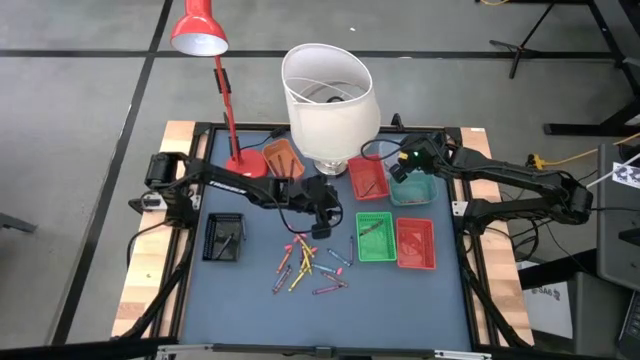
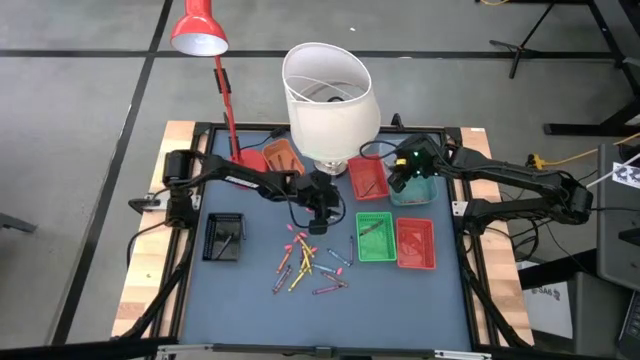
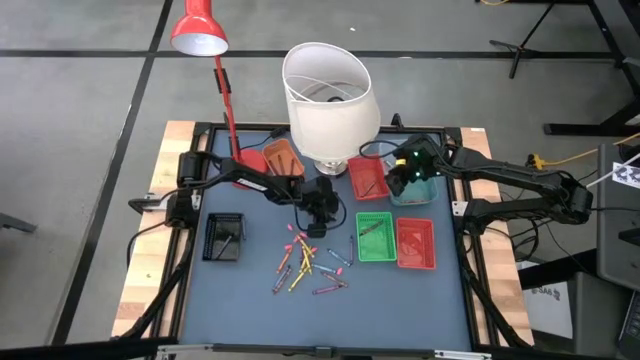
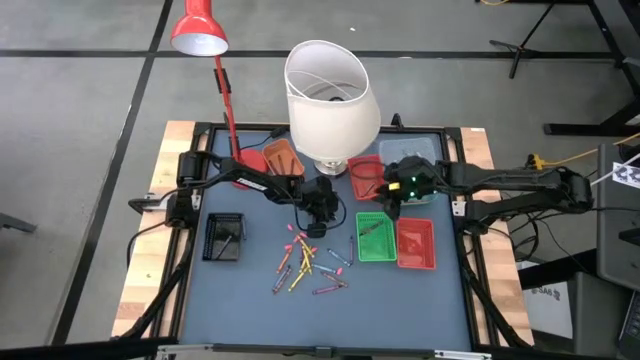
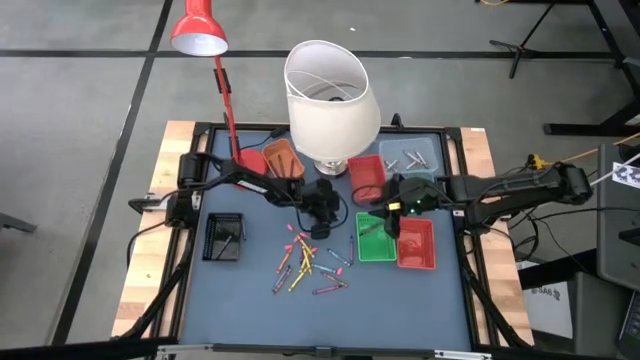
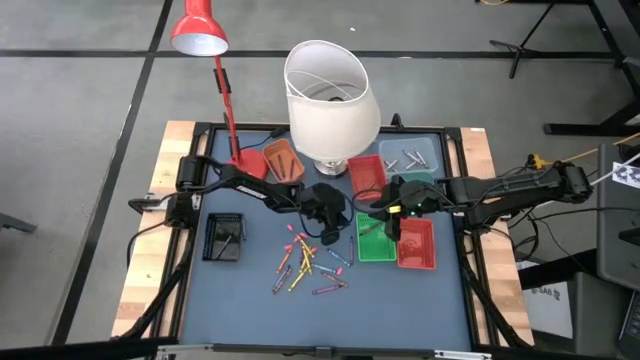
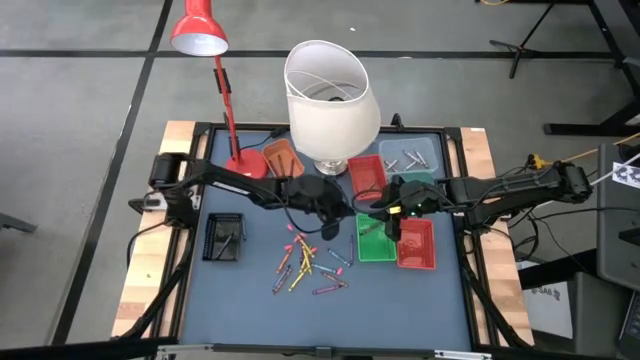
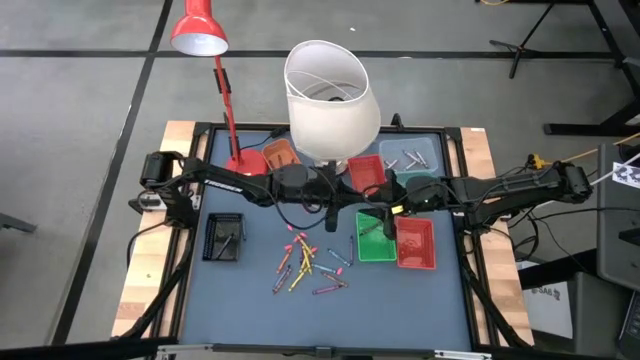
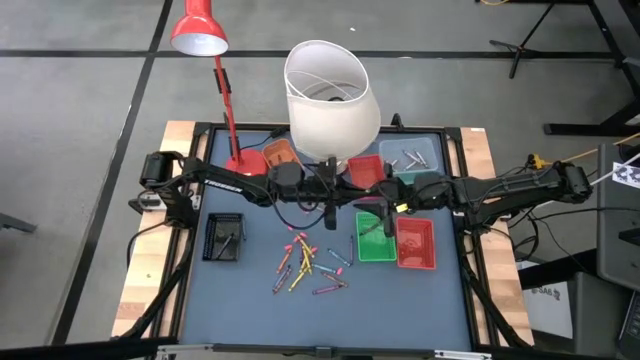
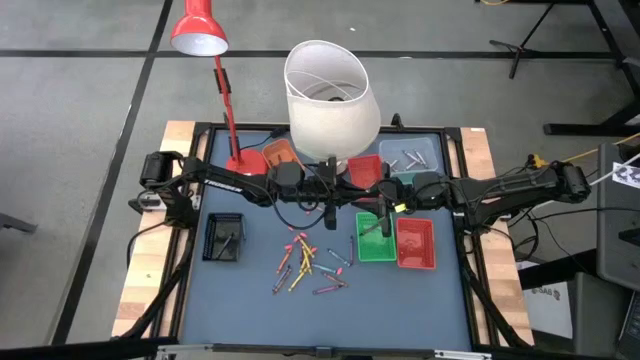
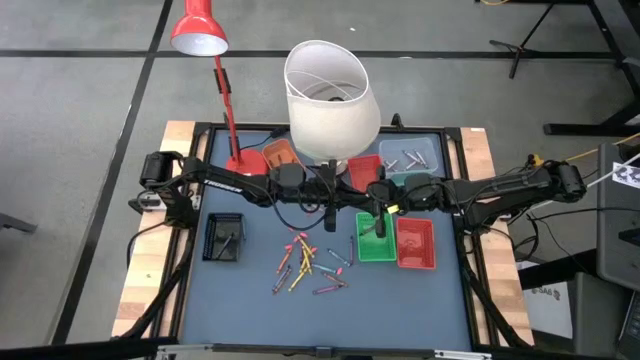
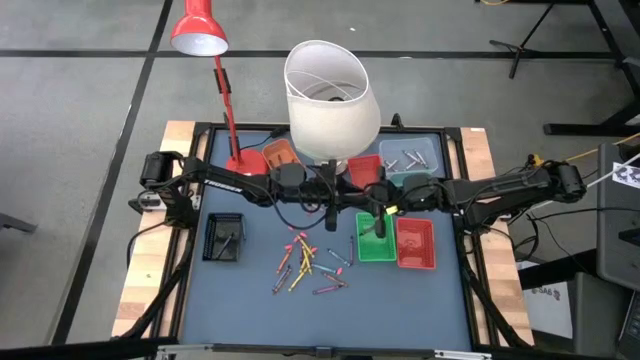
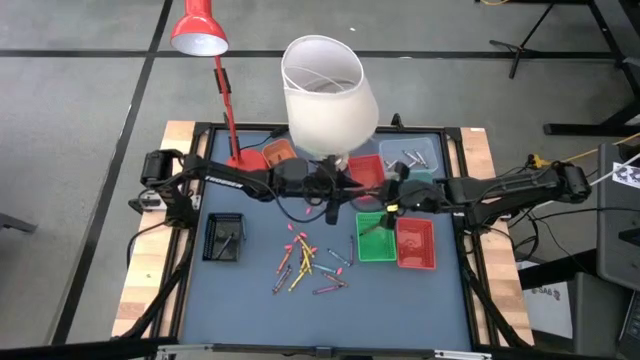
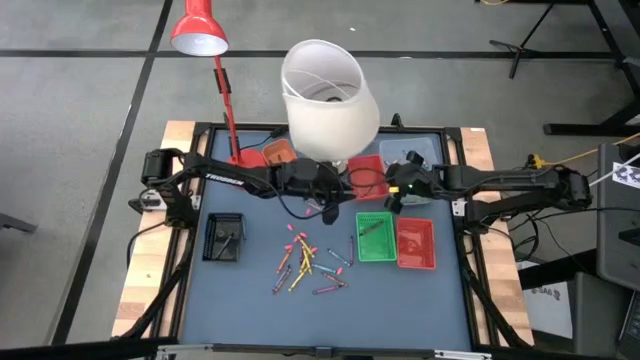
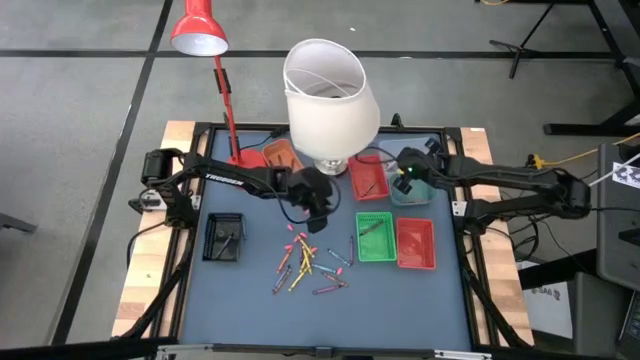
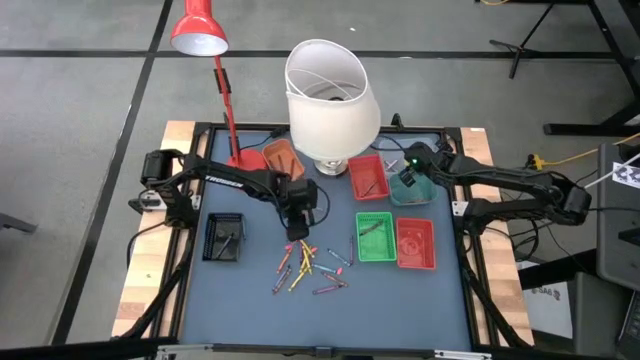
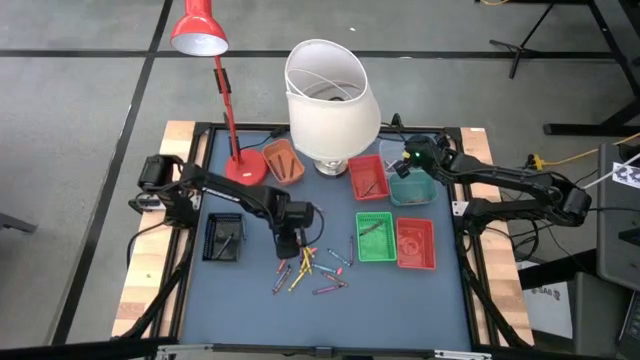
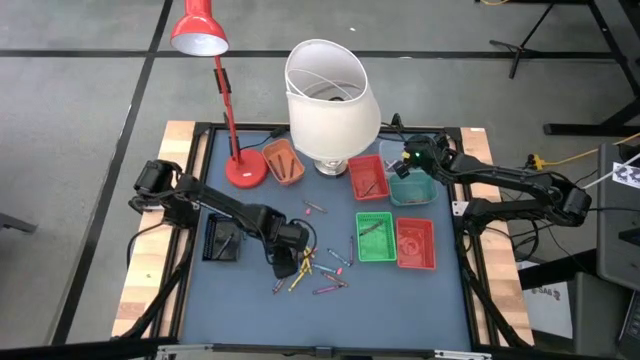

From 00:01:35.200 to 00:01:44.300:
Task: Sort crayons
Put the gray crayon into the transparent bin

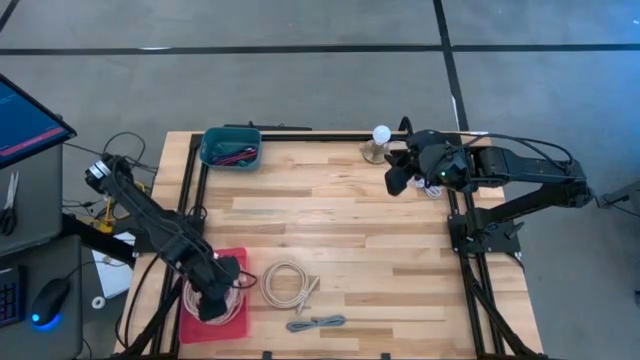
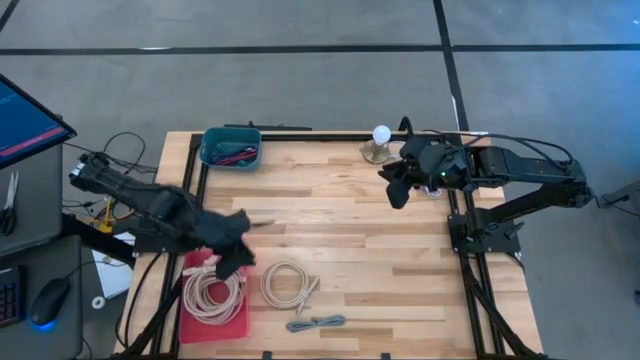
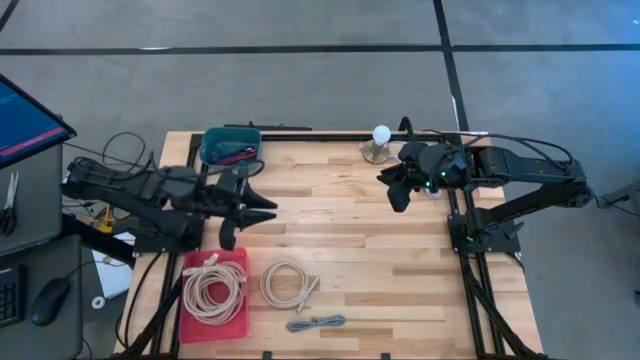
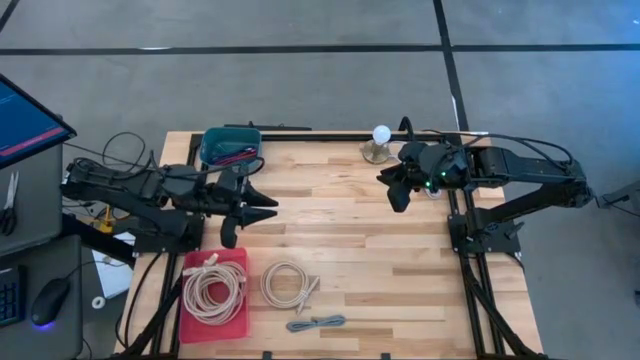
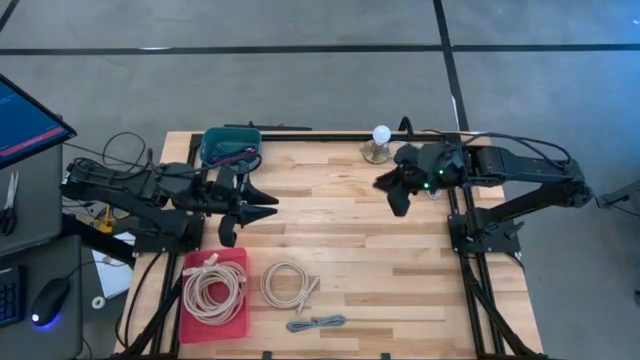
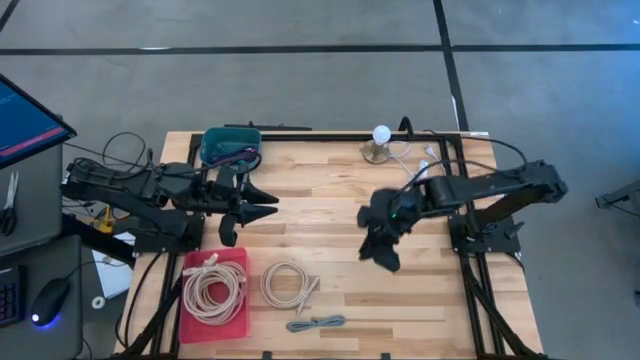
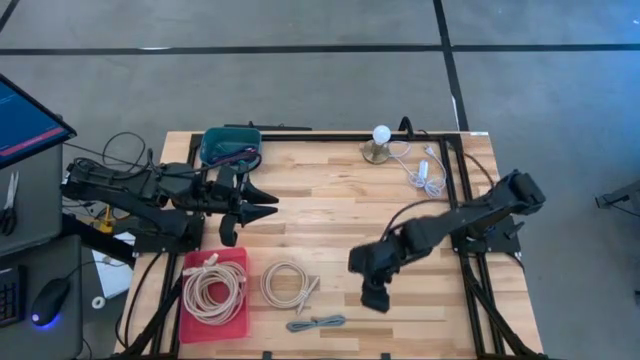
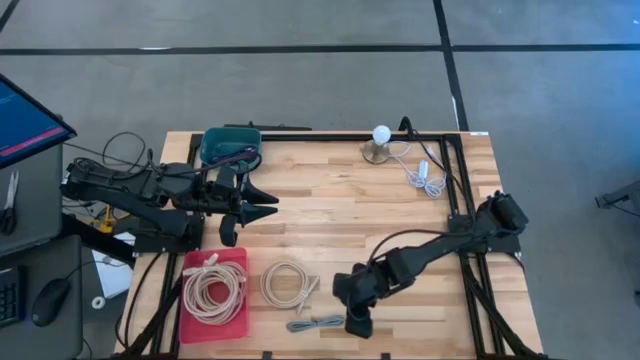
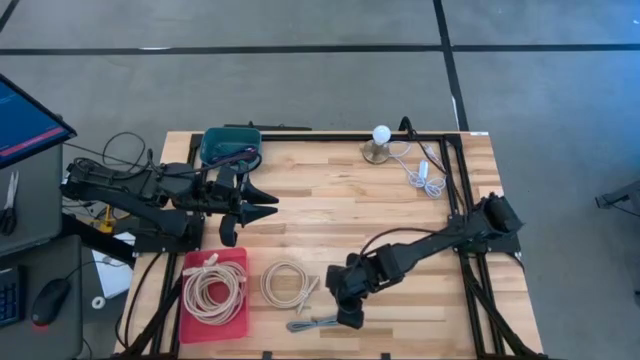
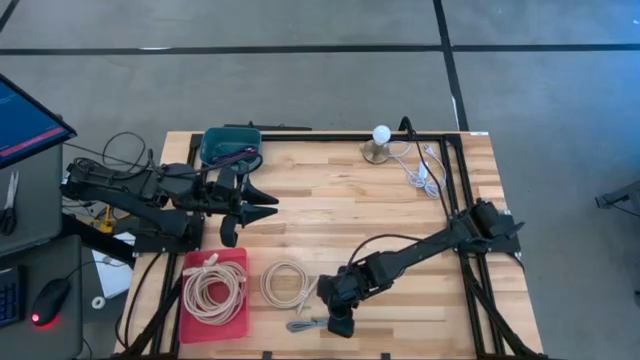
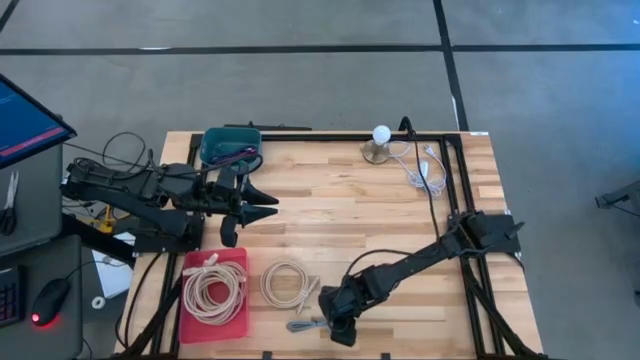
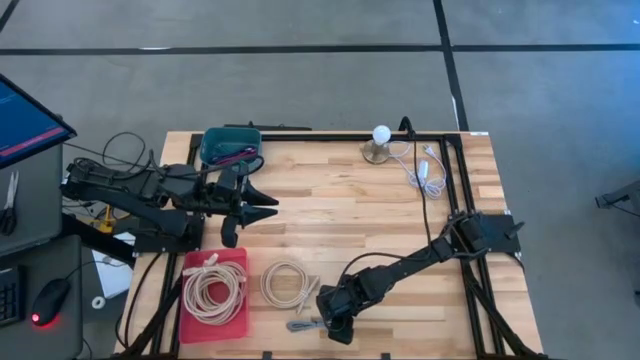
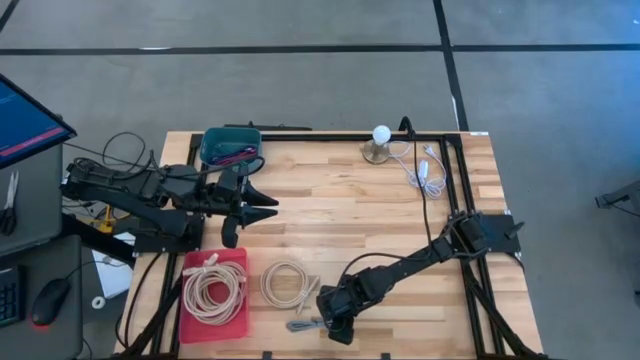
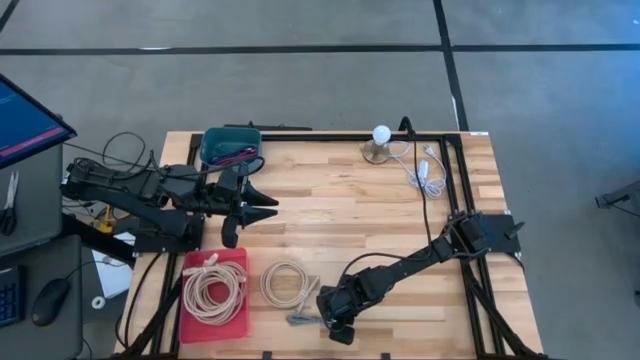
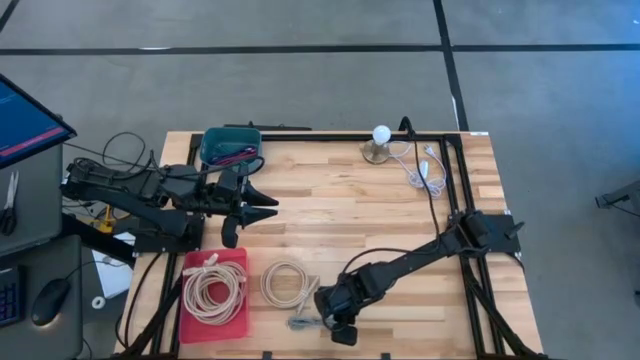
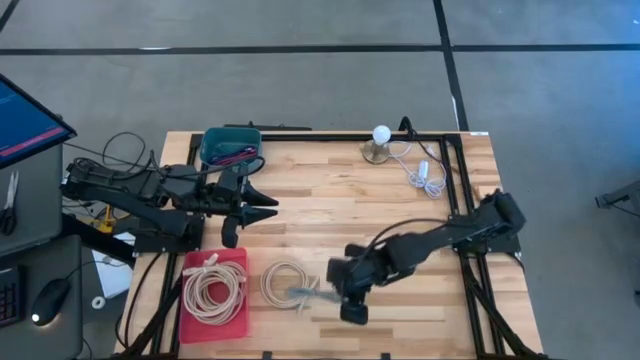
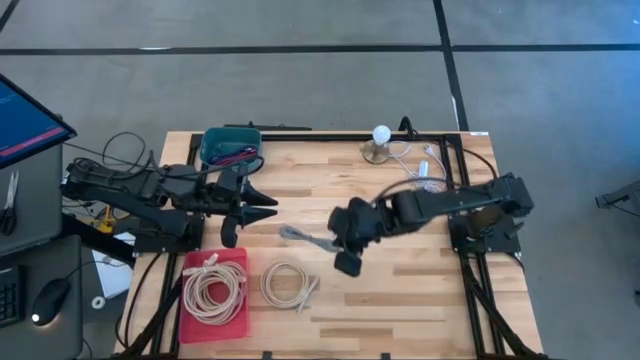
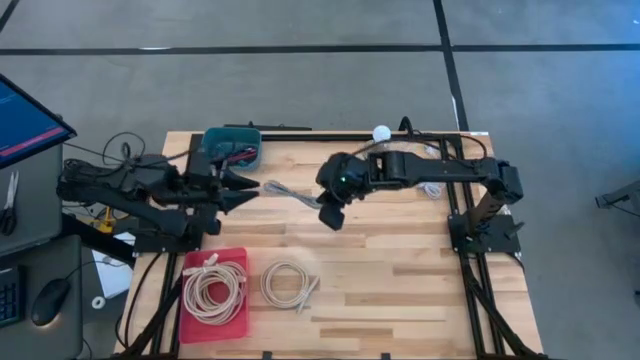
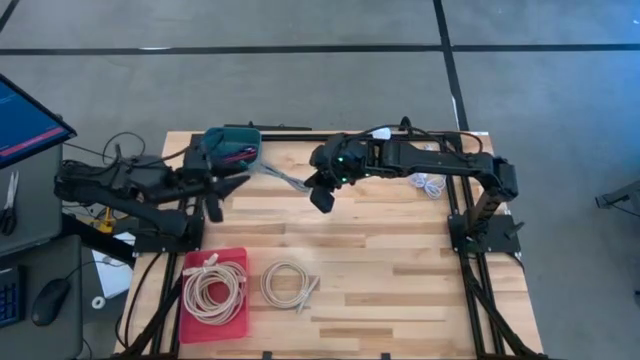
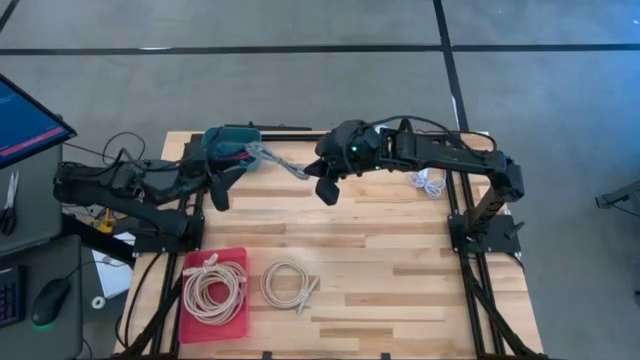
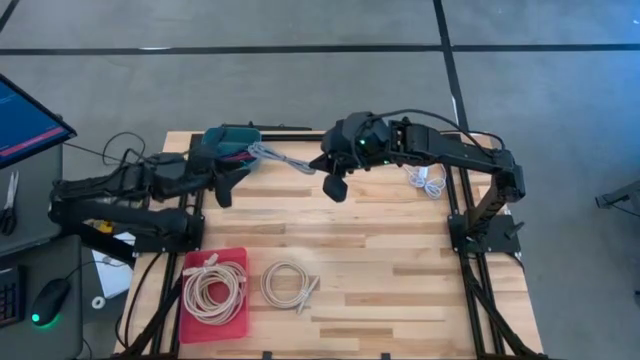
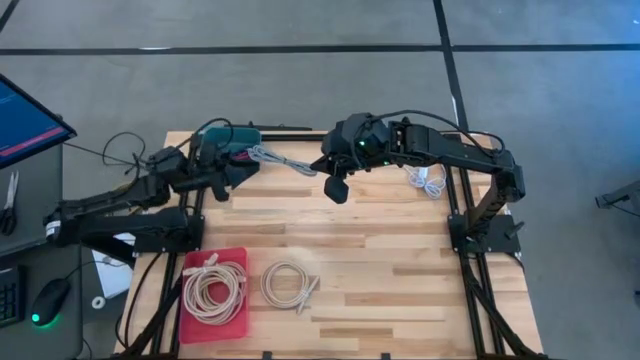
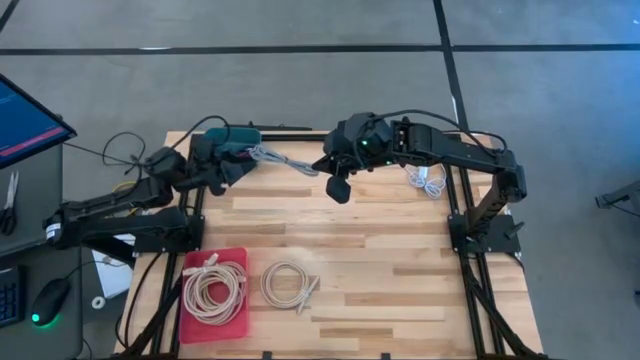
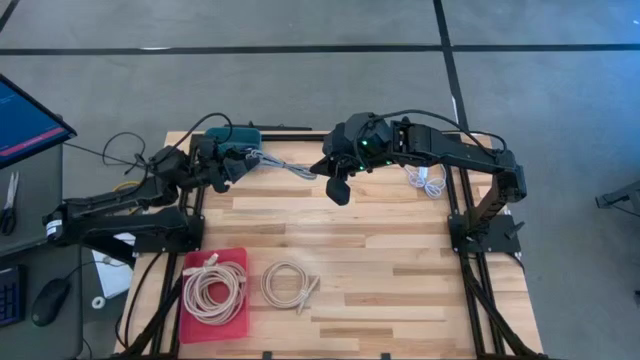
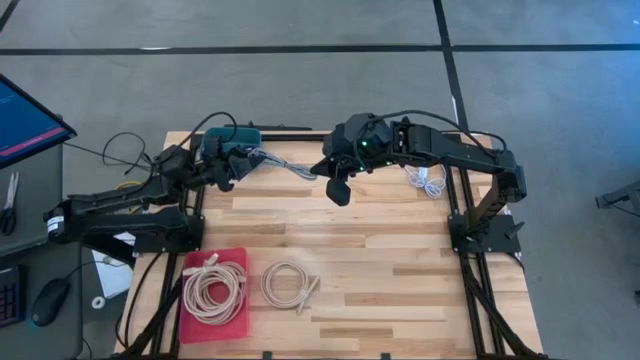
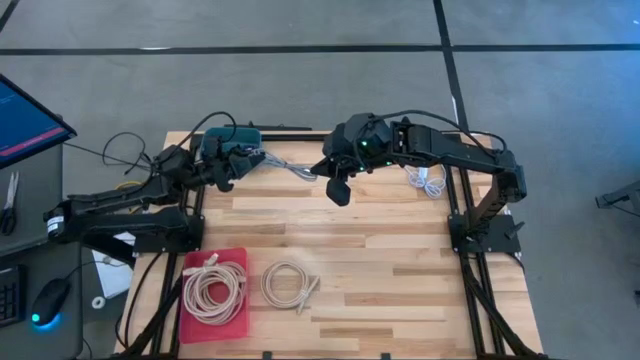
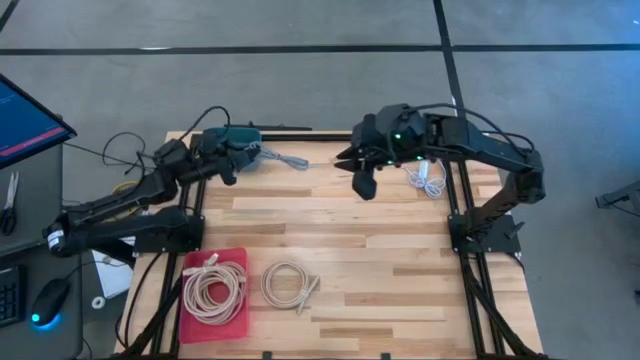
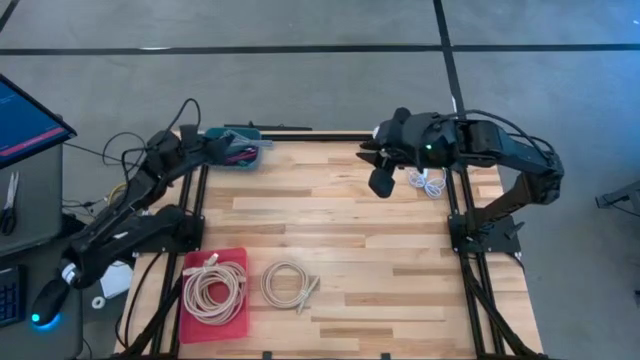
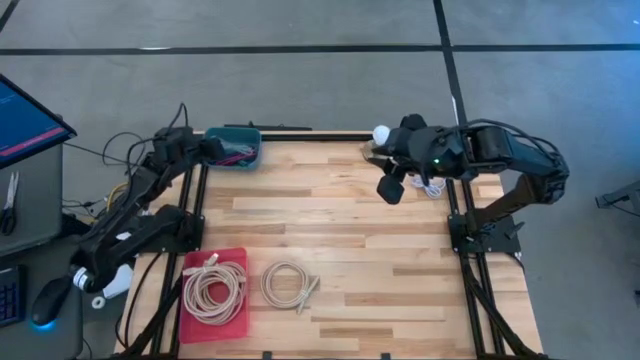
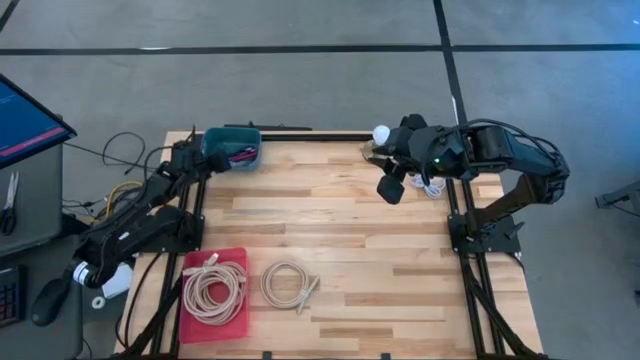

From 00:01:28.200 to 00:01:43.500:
Task: Pick & Place USB Port
Put the black and white USB cable into the blue bin
